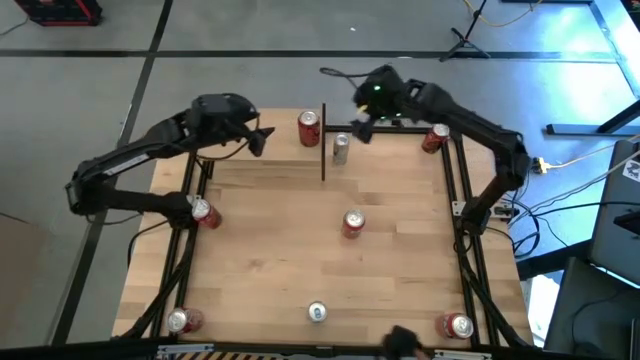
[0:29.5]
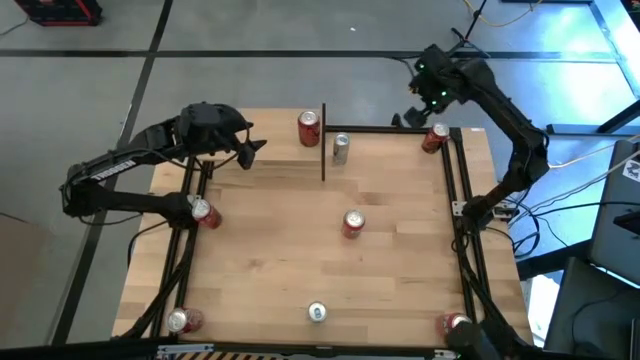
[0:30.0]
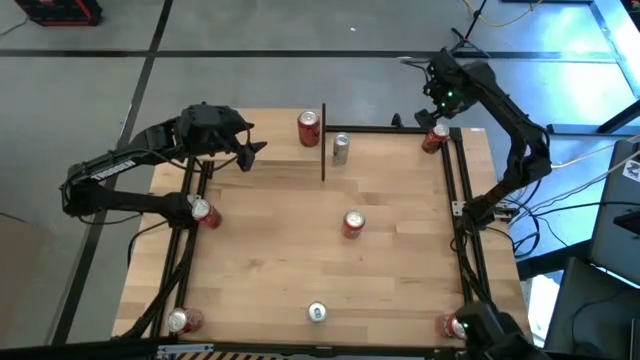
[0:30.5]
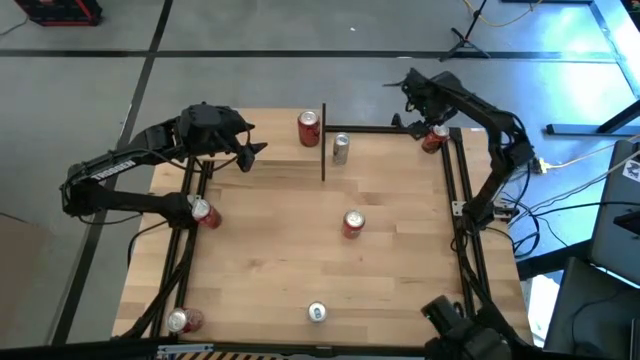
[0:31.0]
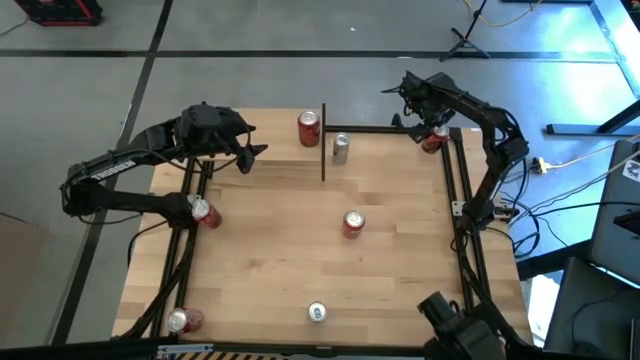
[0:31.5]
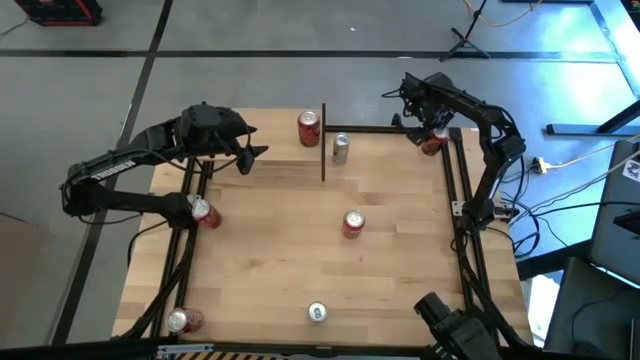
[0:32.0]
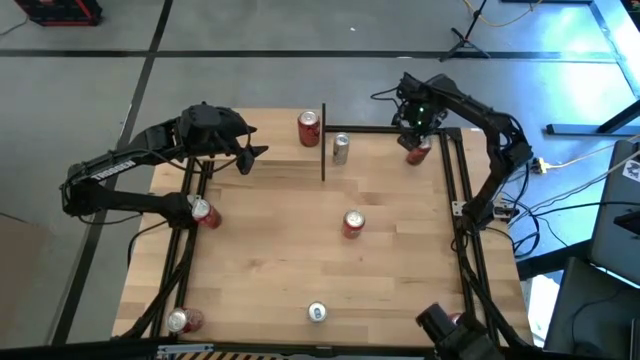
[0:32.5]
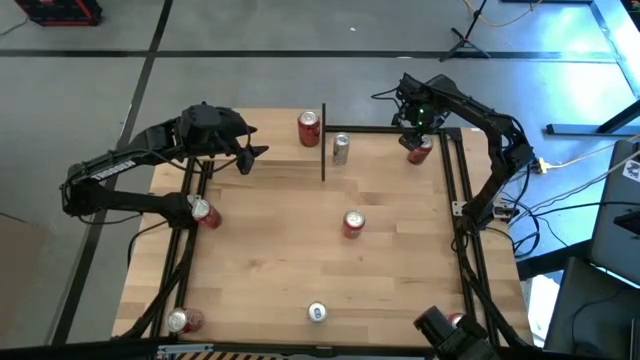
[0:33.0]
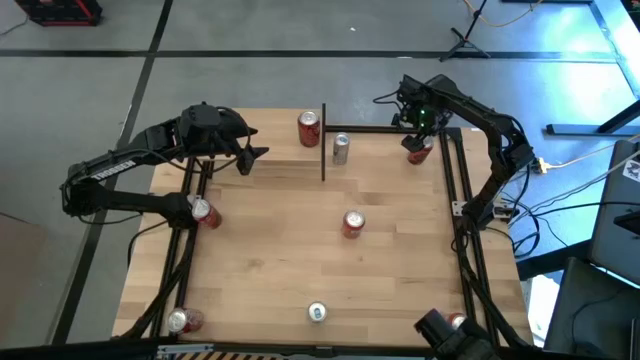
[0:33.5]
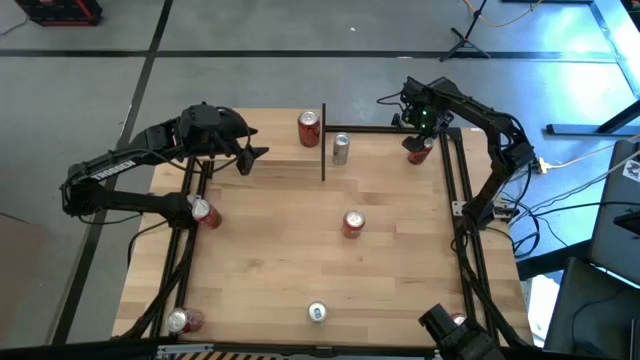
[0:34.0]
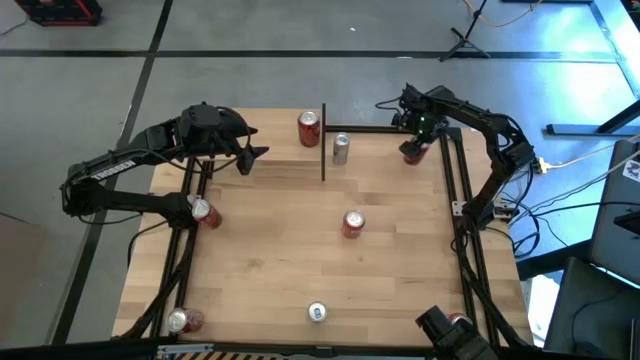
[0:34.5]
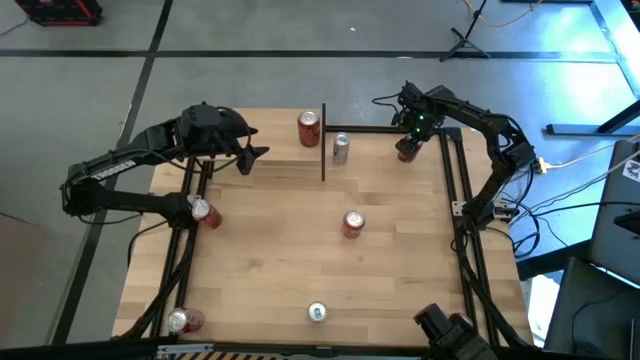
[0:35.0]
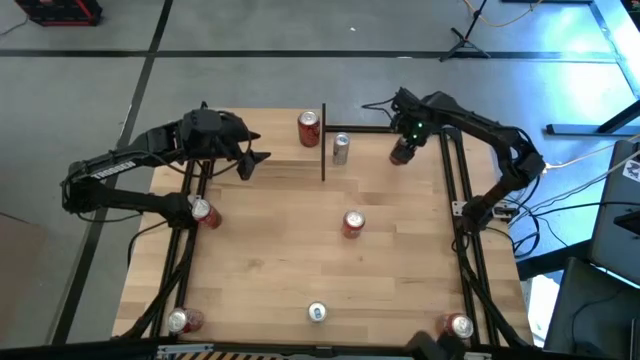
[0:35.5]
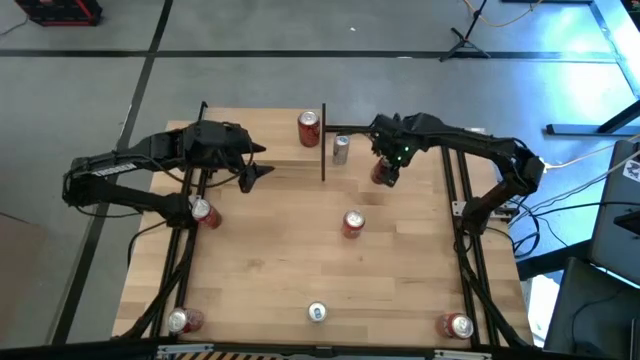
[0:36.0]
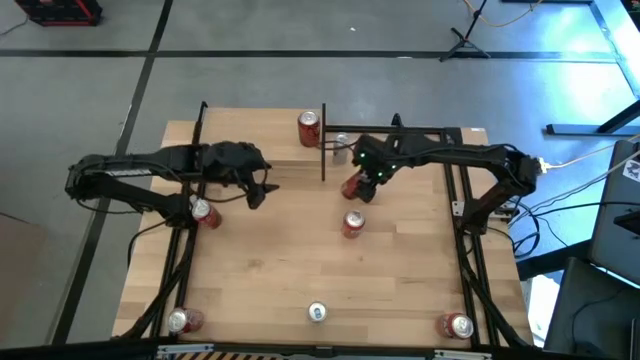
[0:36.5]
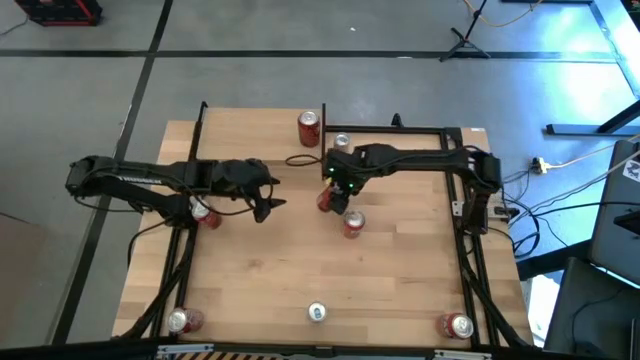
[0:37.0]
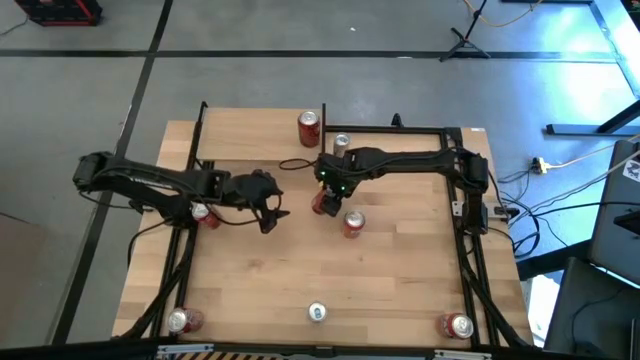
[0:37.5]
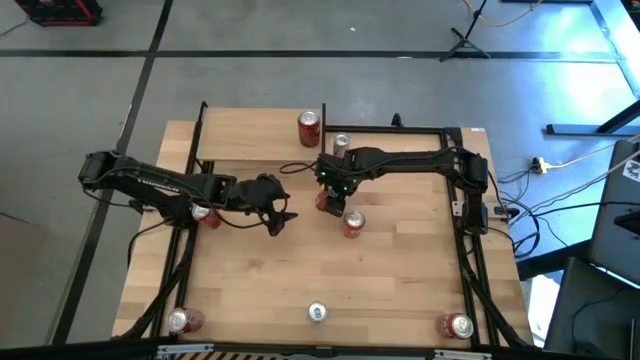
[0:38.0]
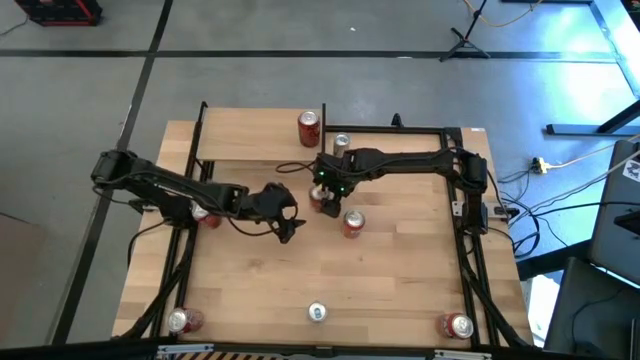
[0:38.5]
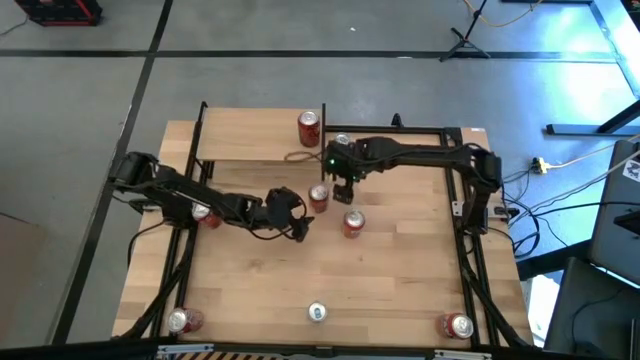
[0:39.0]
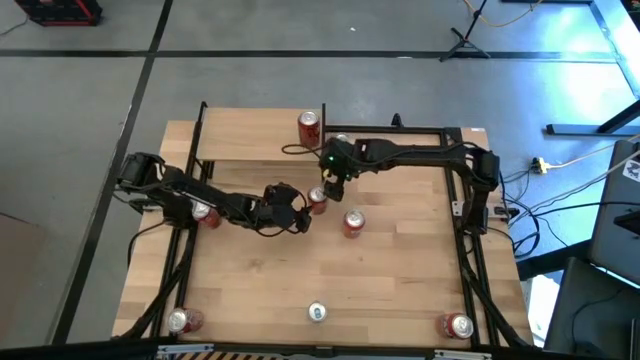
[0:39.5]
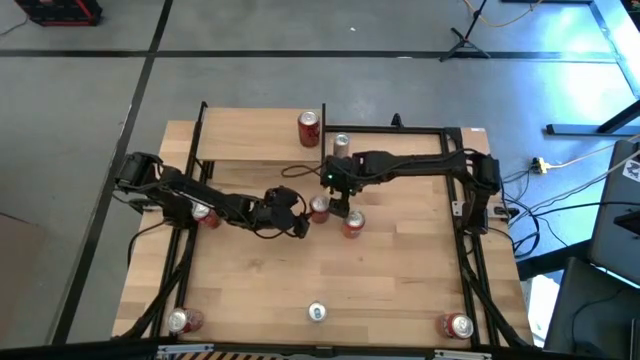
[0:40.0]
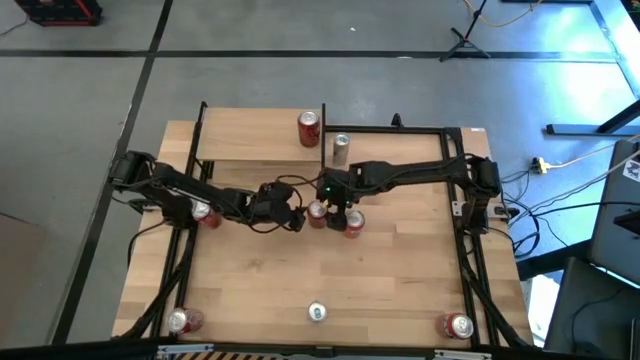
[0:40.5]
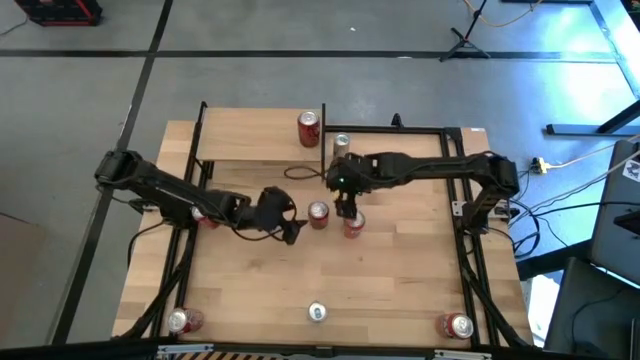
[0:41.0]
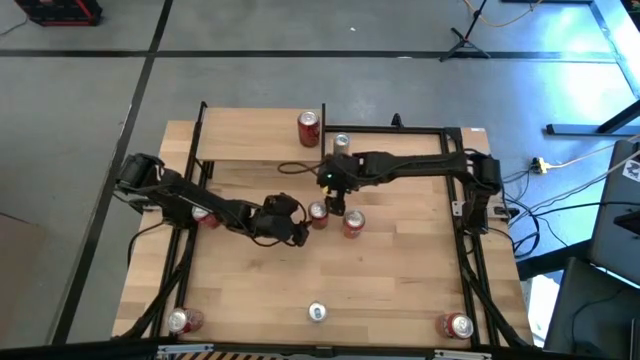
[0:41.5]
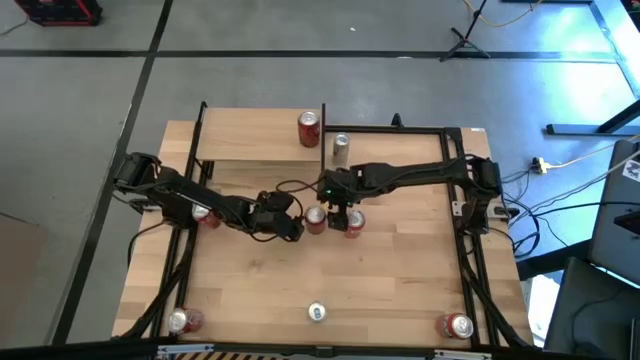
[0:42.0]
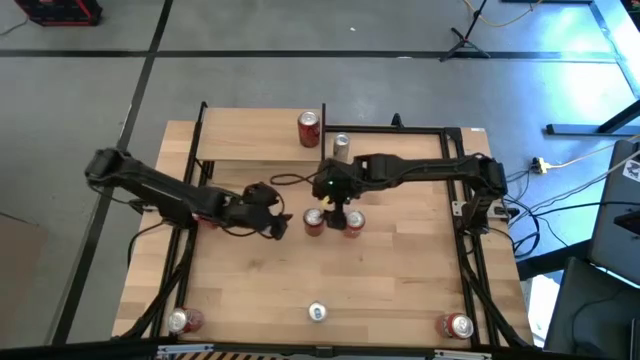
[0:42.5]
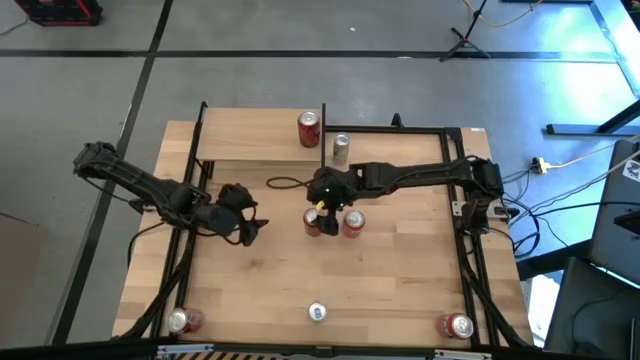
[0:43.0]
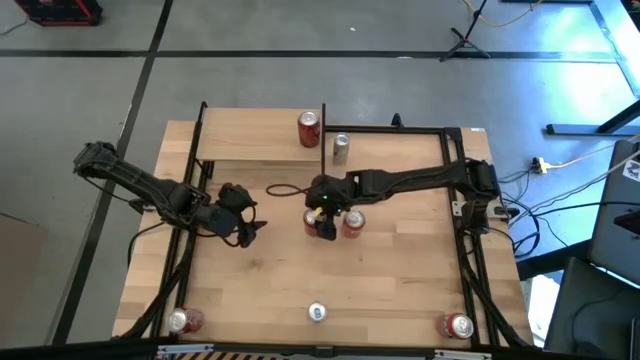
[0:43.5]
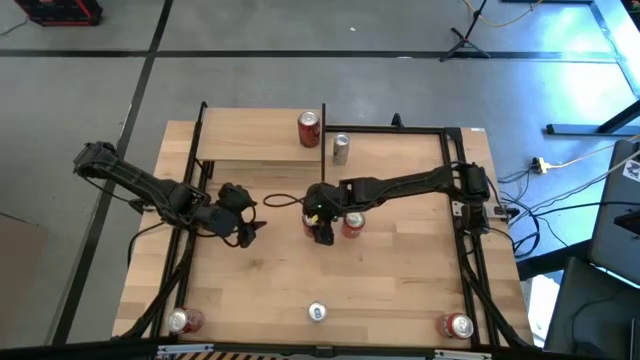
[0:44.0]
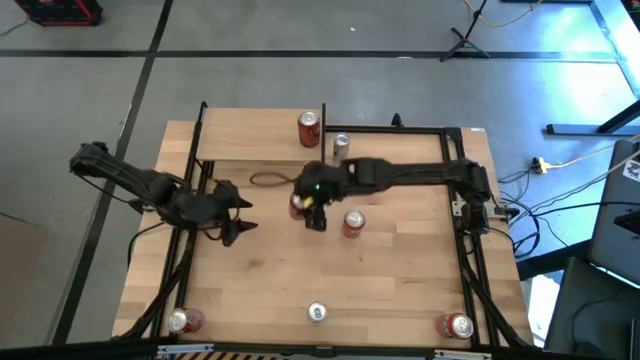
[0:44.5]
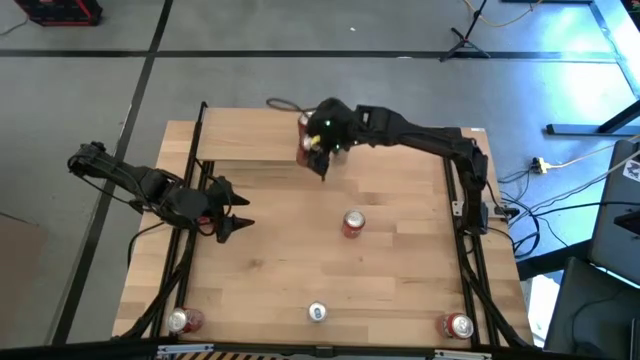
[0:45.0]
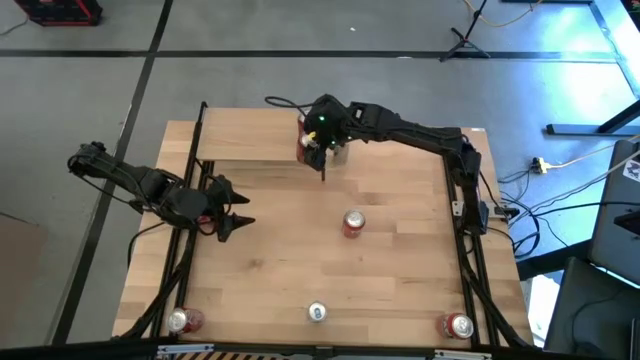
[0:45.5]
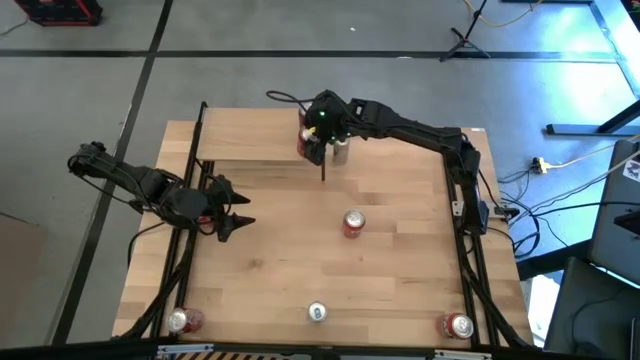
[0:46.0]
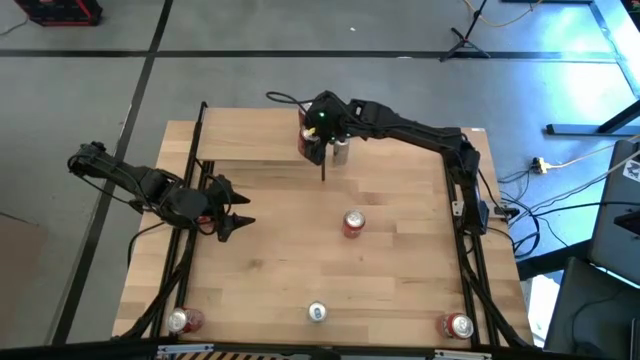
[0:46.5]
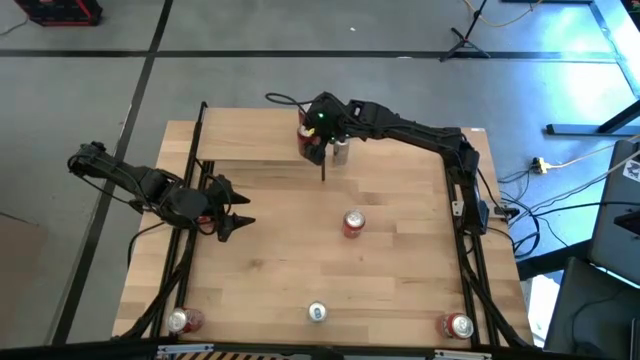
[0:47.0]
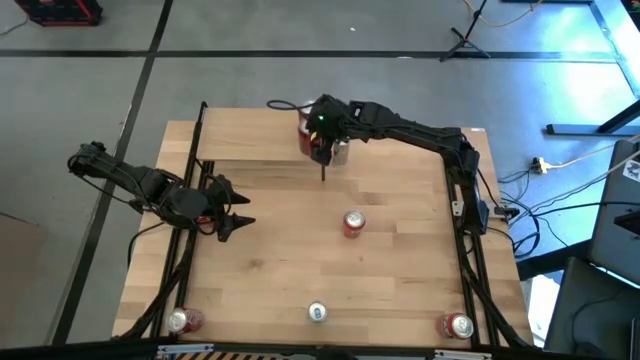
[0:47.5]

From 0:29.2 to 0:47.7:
Task: Place canned beverage on shelf
Put the red-black soda can on the shelf aligned with the other red-black soda can

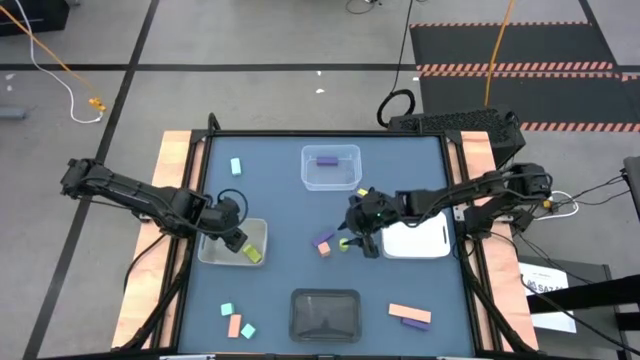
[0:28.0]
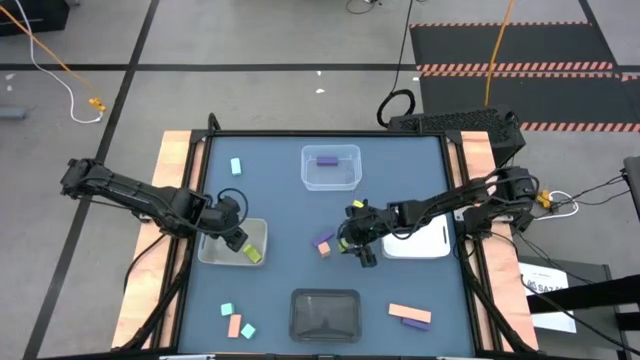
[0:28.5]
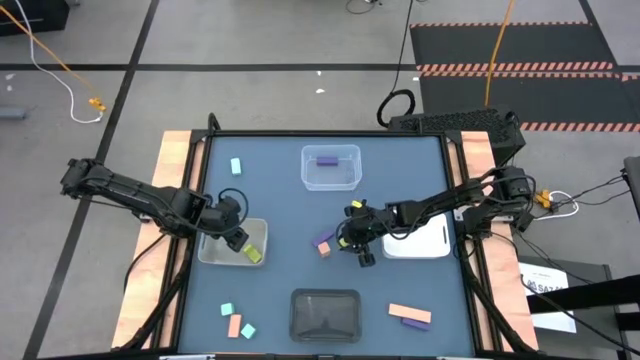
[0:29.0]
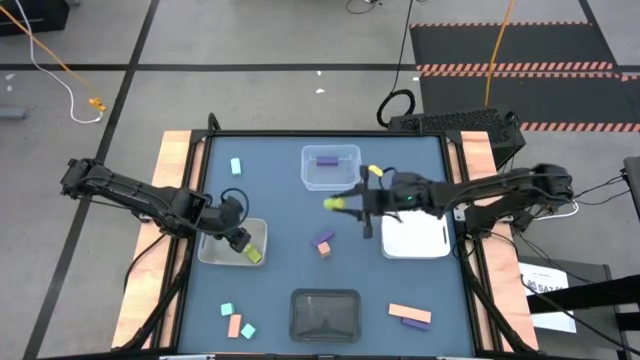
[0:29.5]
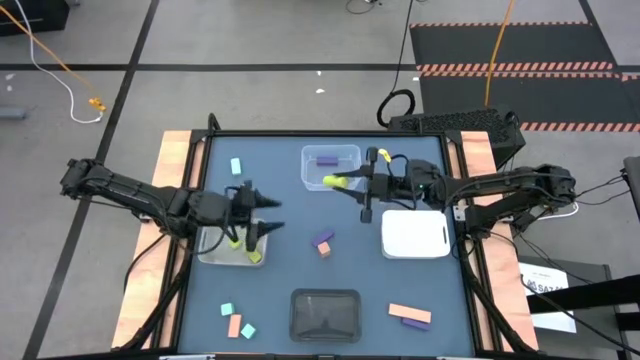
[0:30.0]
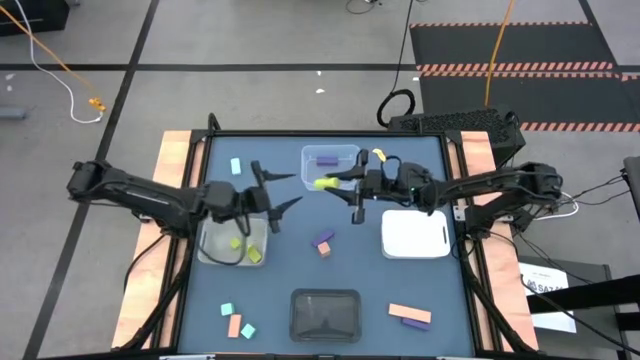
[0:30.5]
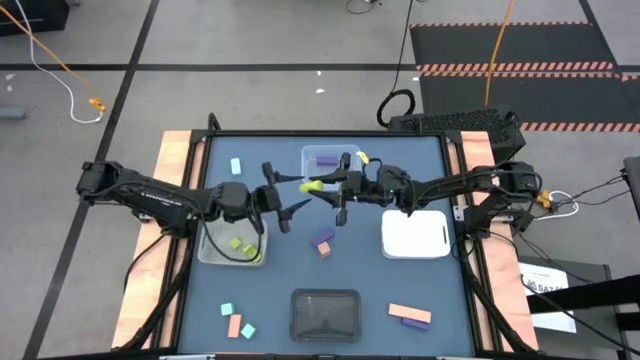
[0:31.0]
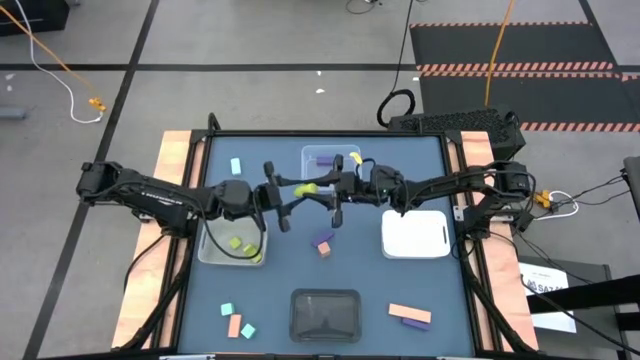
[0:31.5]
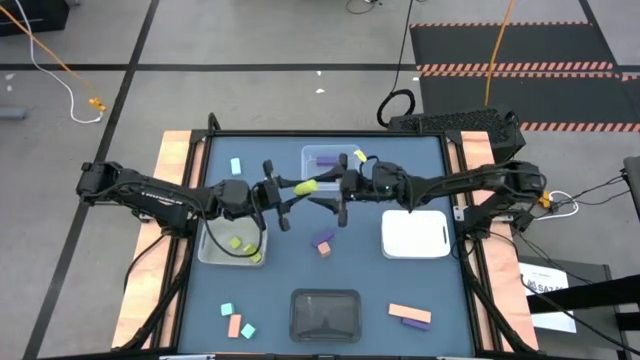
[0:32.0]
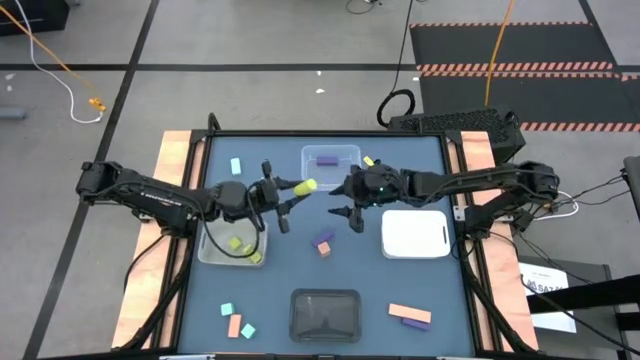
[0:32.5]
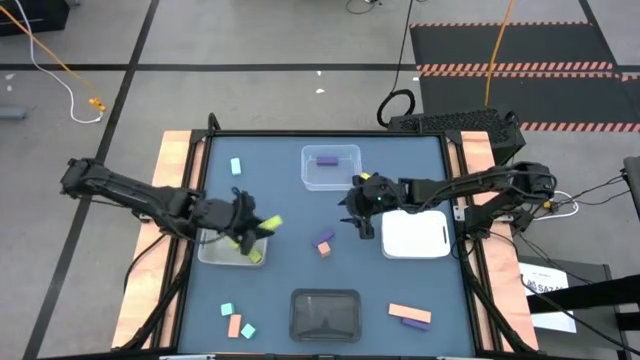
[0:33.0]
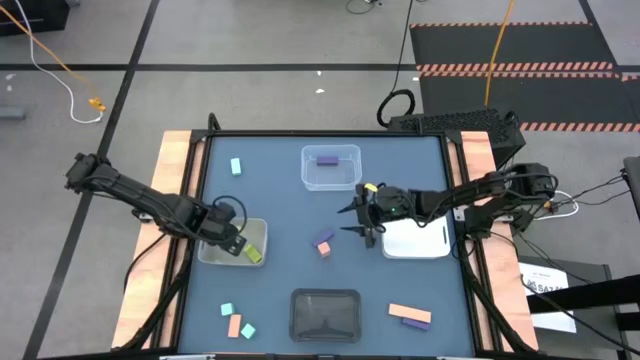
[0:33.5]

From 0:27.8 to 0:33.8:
Task: Sort & place blocks by color
Put the light yellow block into the gray bin
